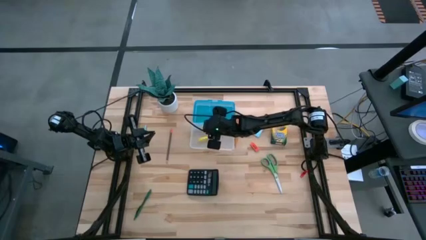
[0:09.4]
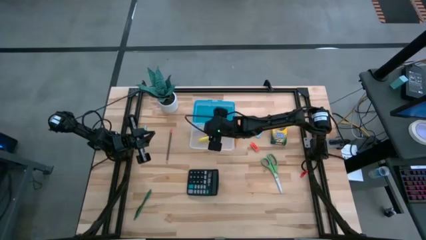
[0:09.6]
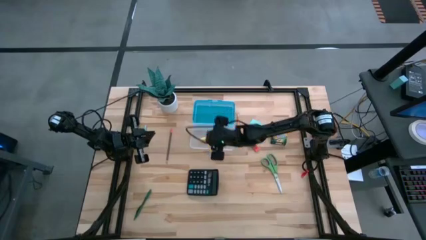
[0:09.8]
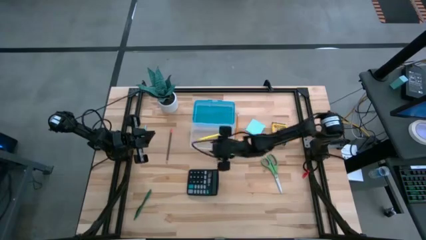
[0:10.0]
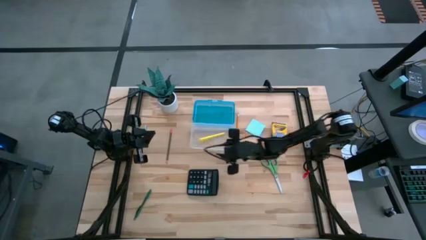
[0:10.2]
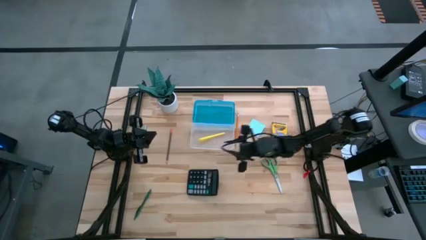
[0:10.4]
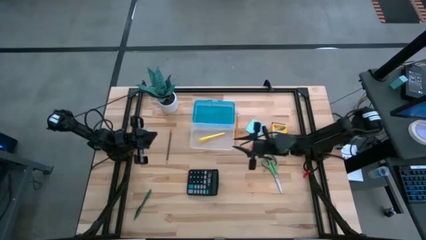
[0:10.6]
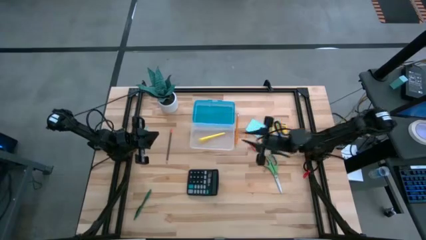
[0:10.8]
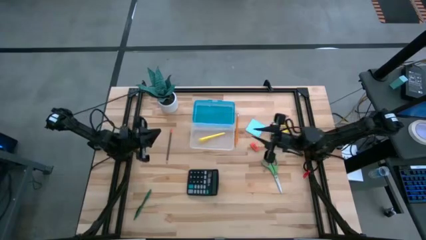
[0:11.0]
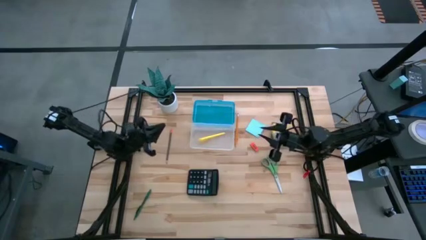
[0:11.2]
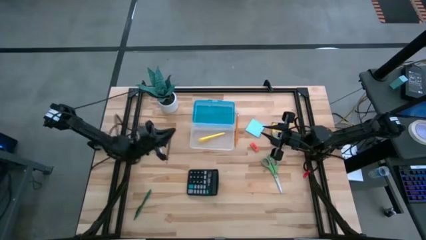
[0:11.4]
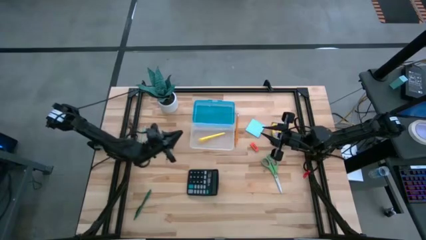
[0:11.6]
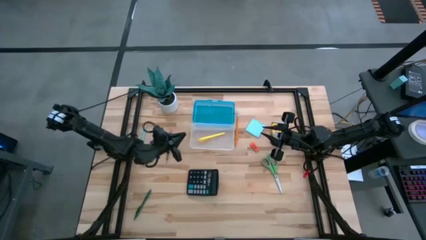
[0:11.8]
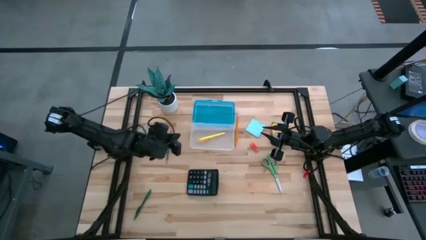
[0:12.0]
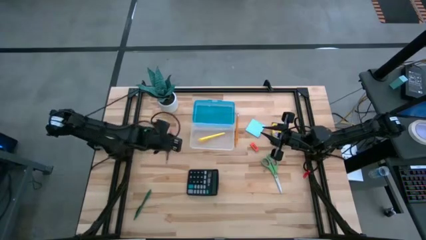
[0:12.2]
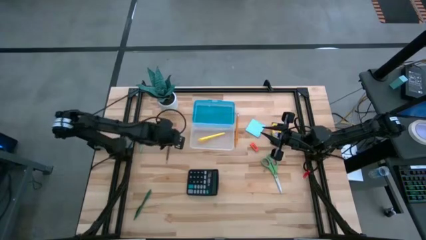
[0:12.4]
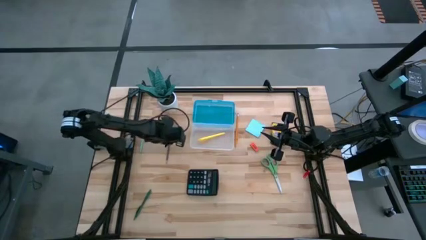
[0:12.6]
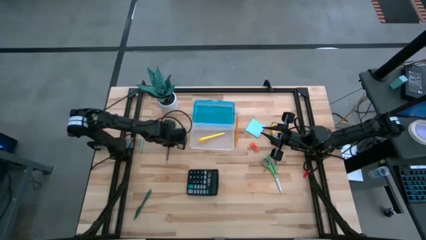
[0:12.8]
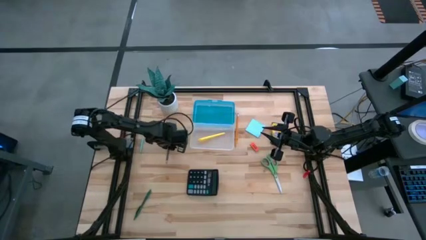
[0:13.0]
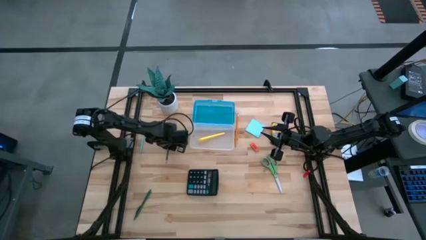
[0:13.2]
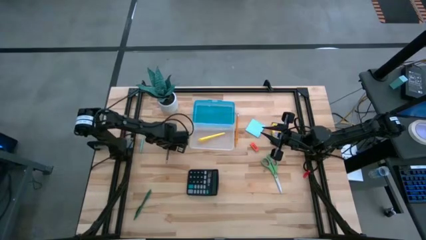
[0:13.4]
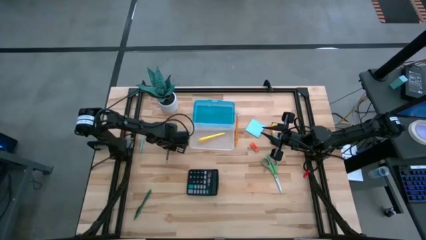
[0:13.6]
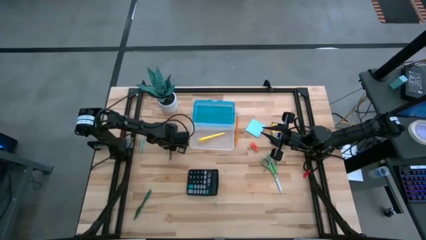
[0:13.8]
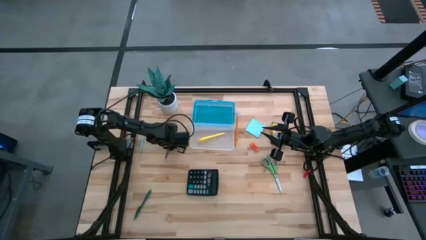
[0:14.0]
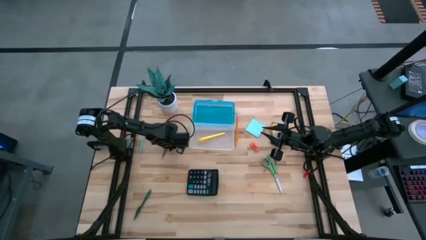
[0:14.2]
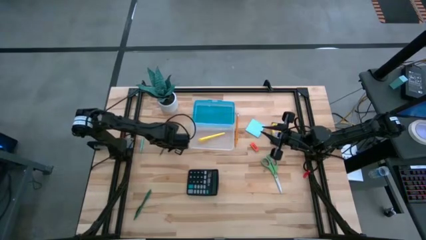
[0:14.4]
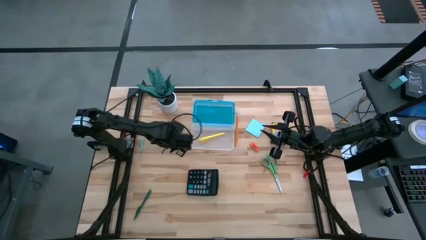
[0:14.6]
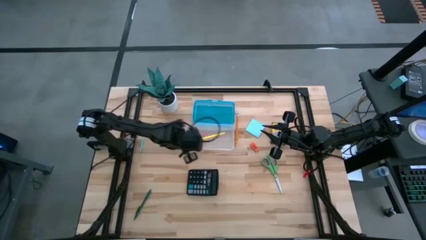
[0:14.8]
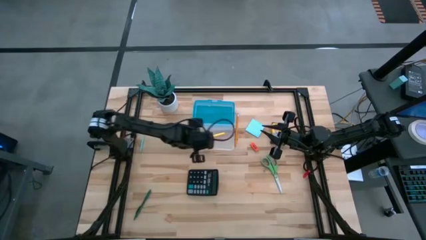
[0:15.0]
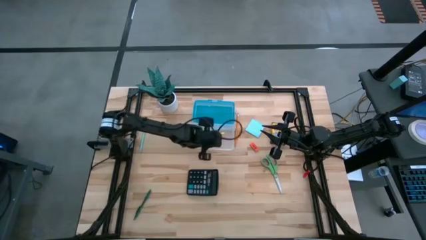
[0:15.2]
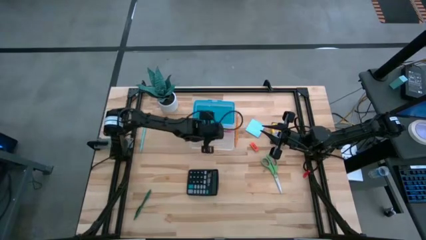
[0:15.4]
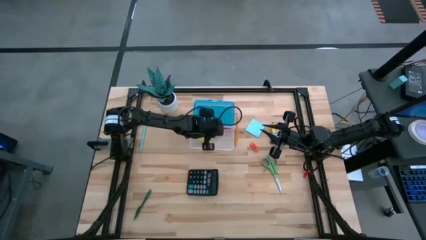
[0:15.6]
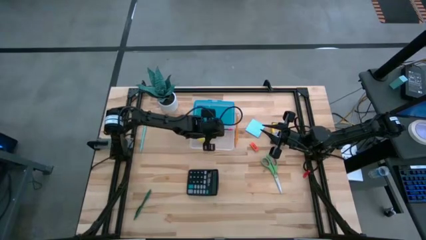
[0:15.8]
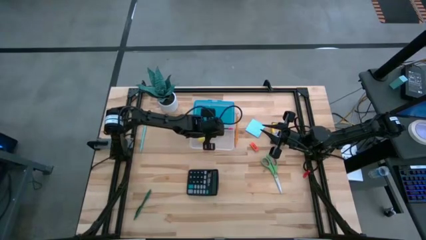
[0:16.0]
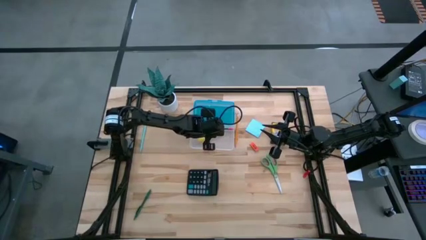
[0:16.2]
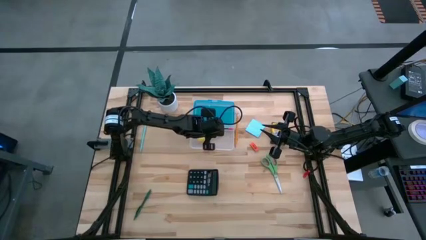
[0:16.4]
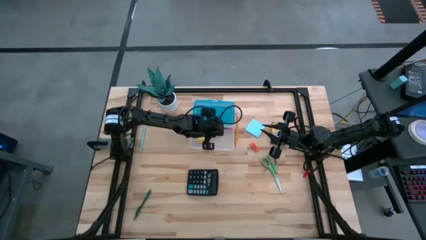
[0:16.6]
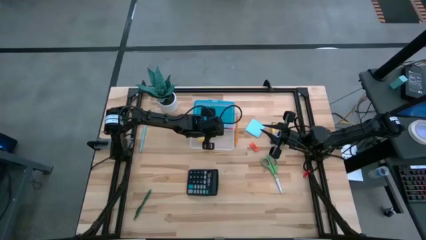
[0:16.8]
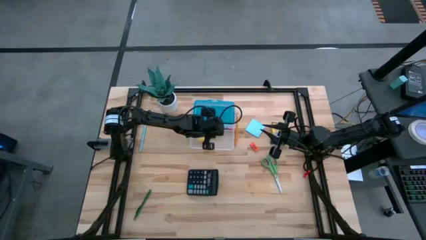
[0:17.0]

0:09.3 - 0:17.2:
Task: Pack school essentials
Put the black pencil into the supply box

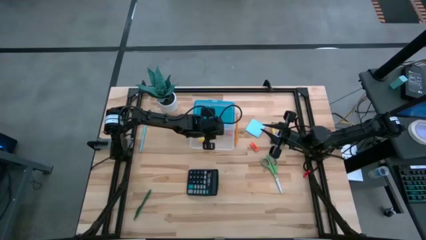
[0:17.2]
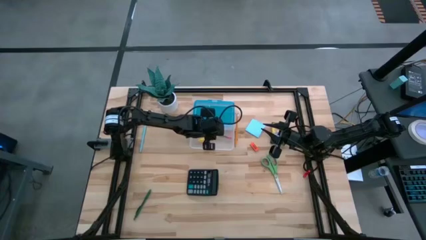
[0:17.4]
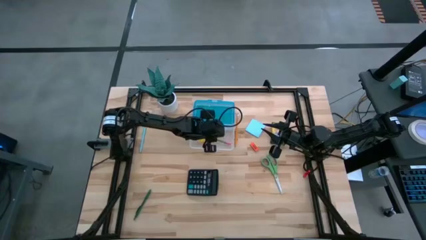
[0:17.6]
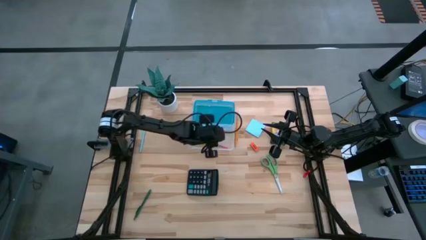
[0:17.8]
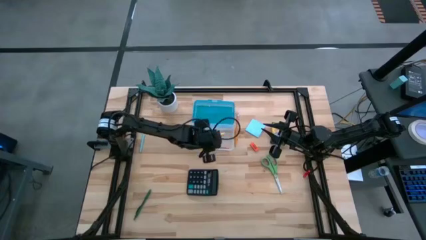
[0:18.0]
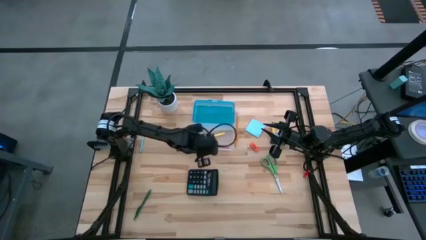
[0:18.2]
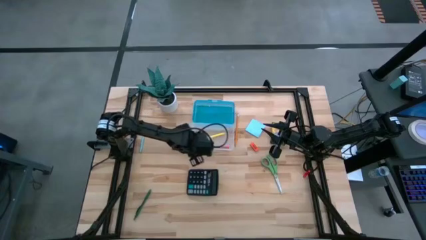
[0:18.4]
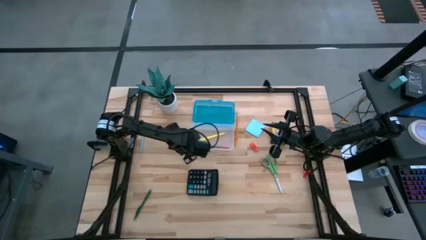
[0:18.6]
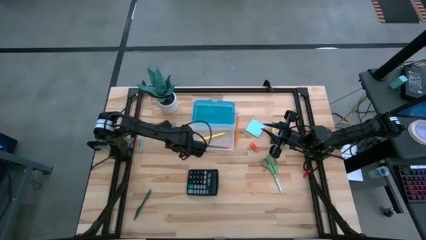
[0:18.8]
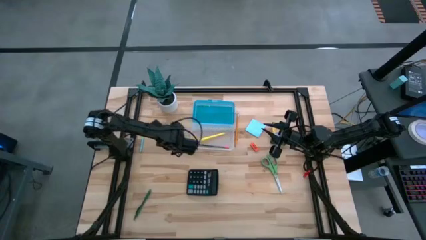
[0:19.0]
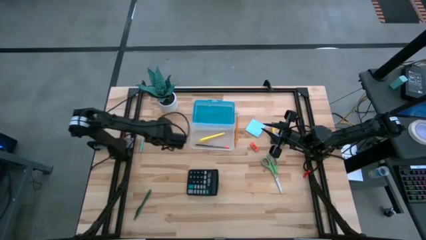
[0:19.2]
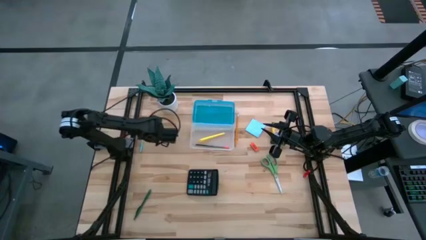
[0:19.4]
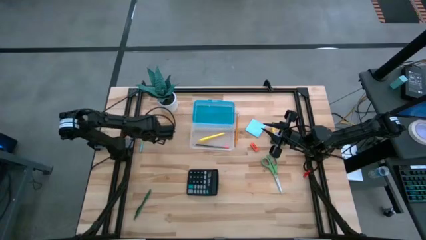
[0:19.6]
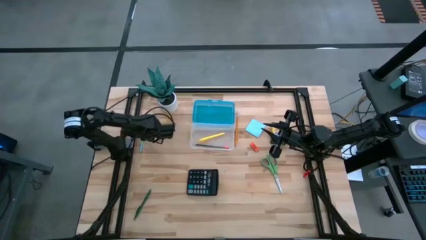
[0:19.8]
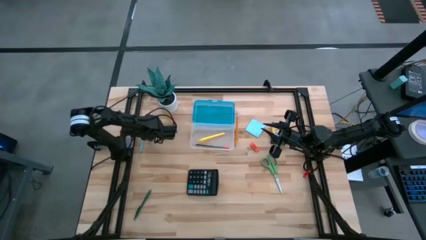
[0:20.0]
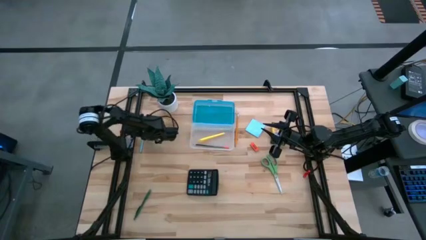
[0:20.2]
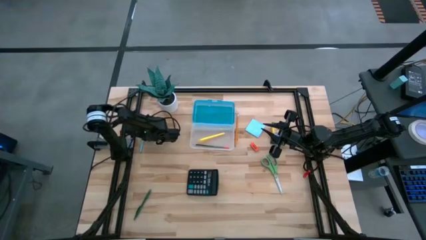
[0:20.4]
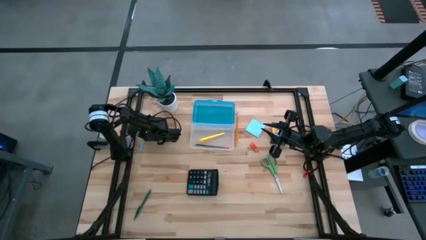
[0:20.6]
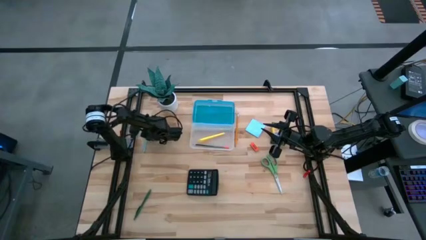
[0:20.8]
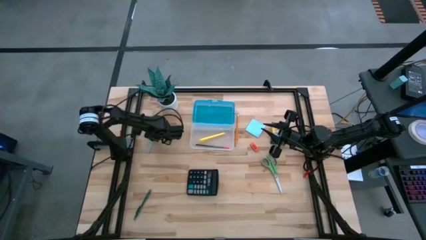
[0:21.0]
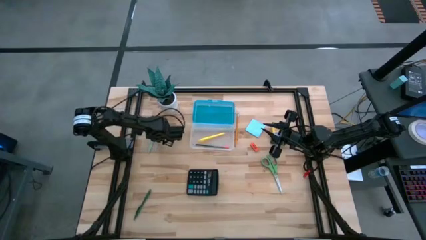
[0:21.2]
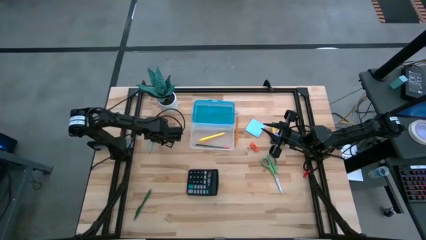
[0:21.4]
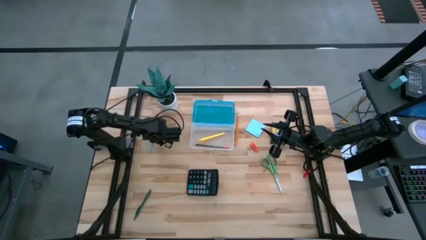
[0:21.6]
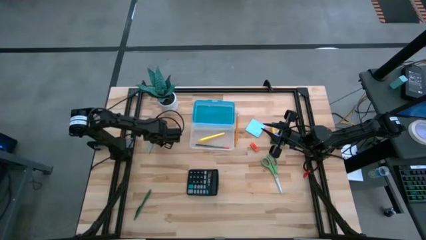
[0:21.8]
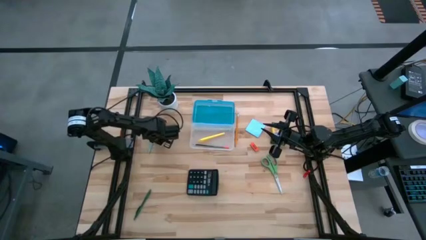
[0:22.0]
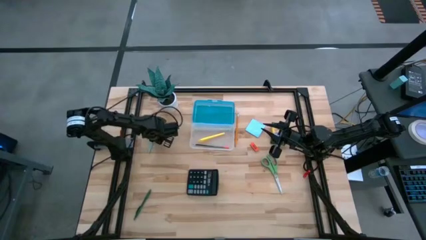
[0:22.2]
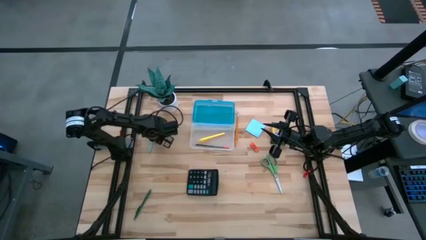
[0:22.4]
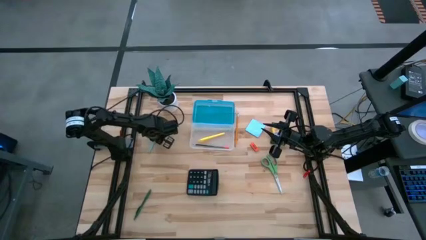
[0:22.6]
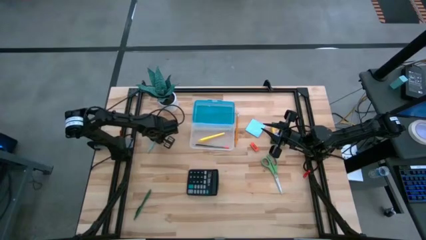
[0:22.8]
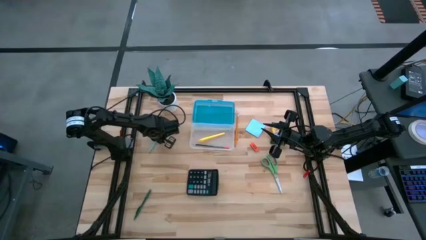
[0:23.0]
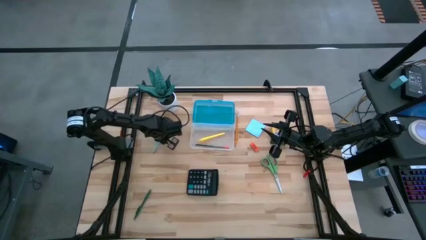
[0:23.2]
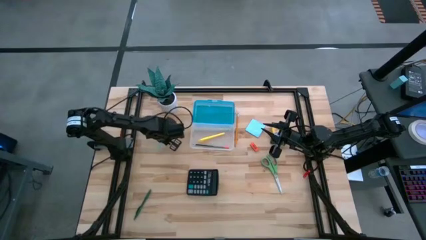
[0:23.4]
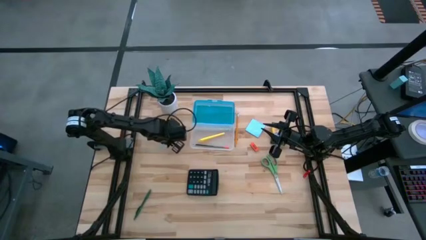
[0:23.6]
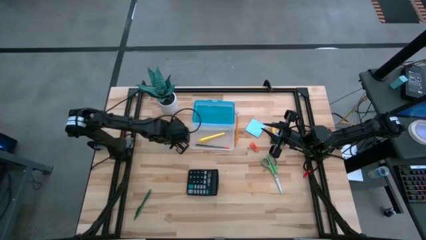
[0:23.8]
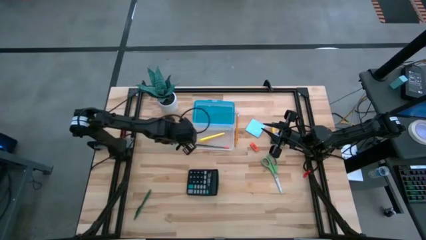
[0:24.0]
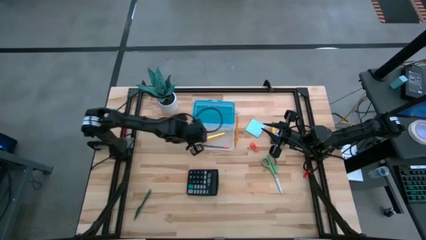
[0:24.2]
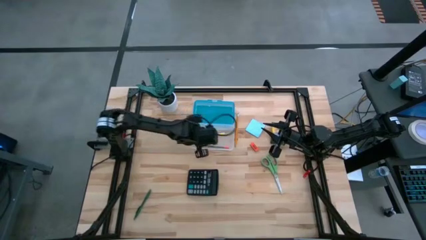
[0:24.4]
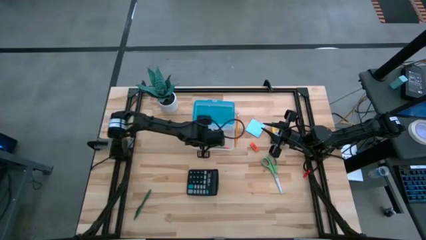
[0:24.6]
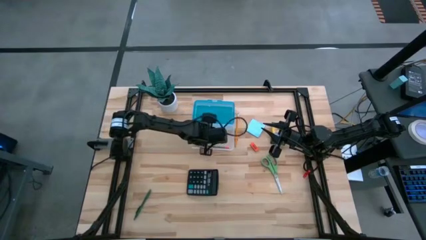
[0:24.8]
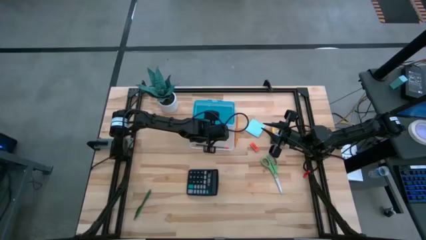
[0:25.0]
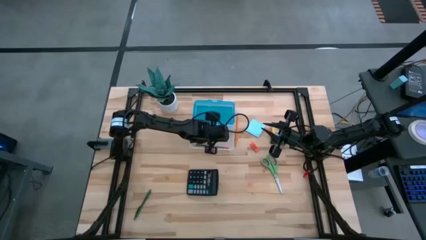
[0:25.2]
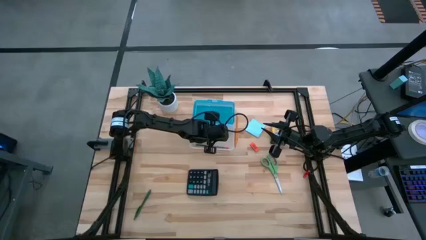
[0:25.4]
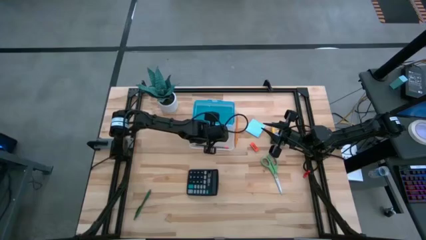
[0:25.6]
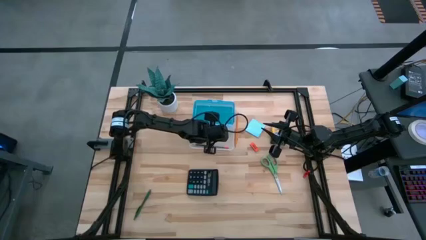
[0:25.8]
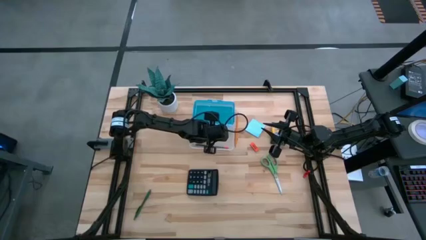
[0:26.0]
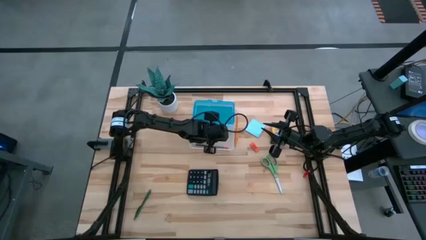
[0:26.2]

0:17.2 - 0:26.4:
Put the light blue pen into the supply box
